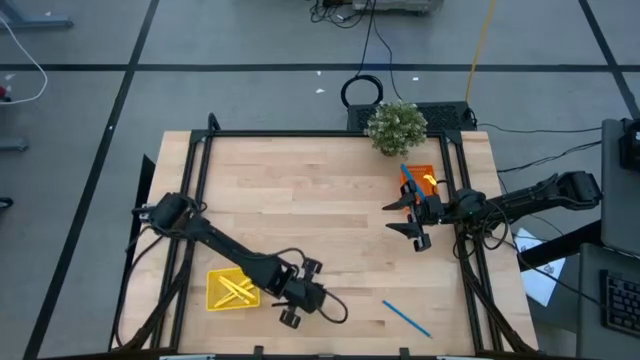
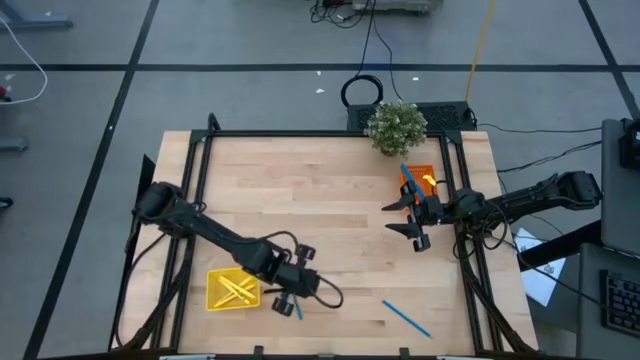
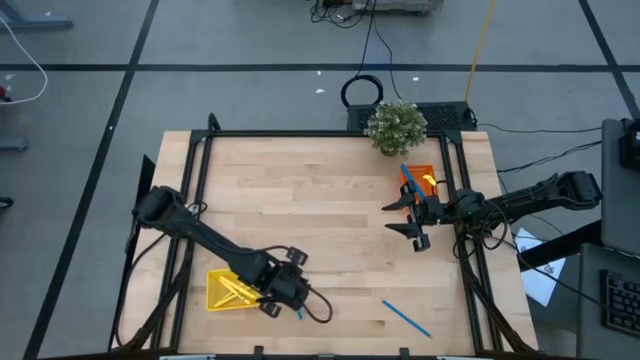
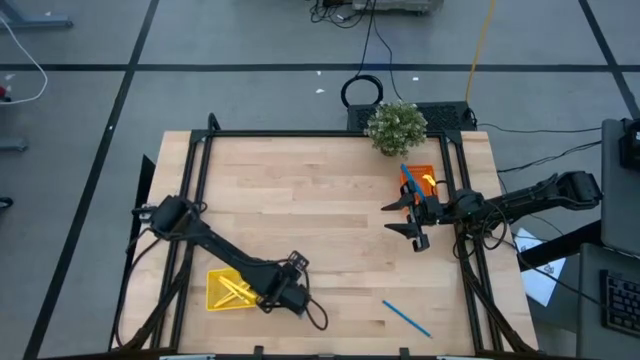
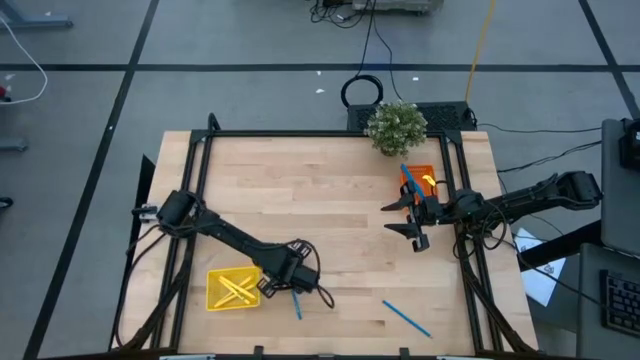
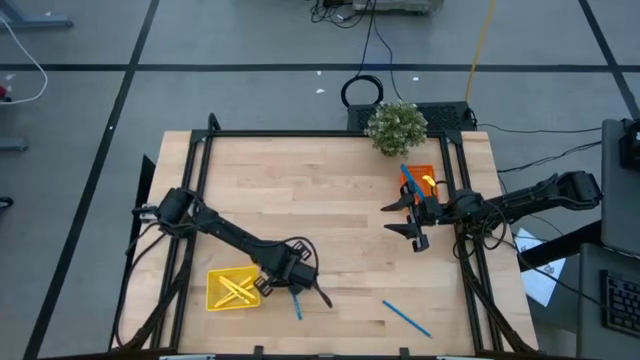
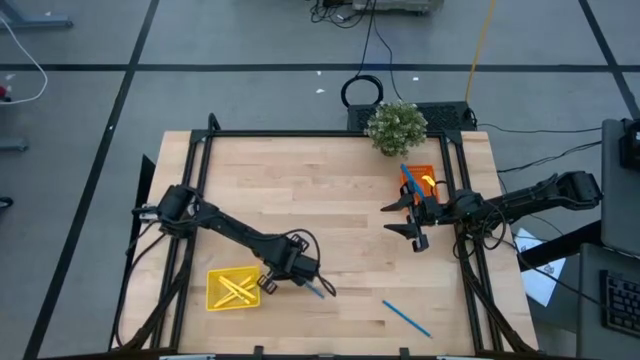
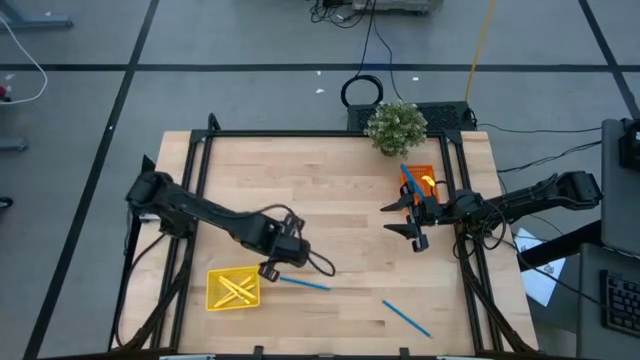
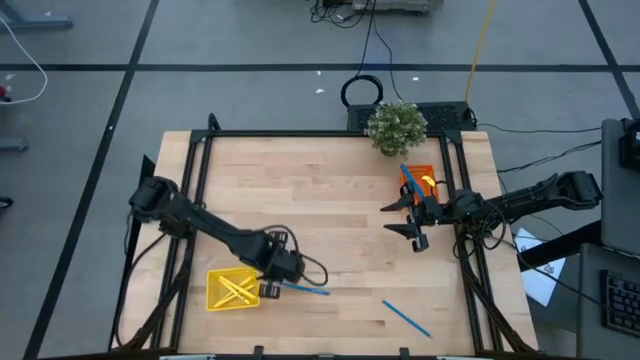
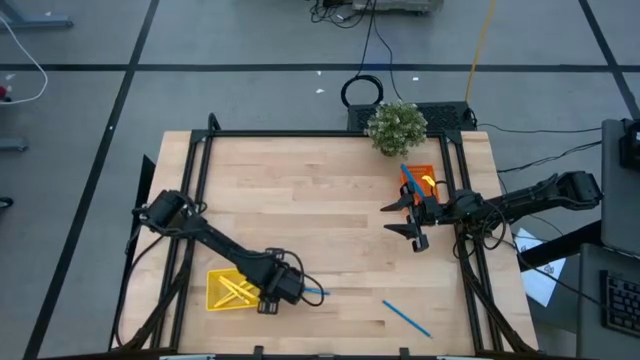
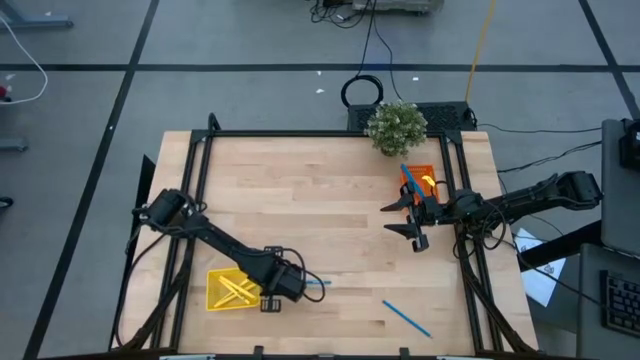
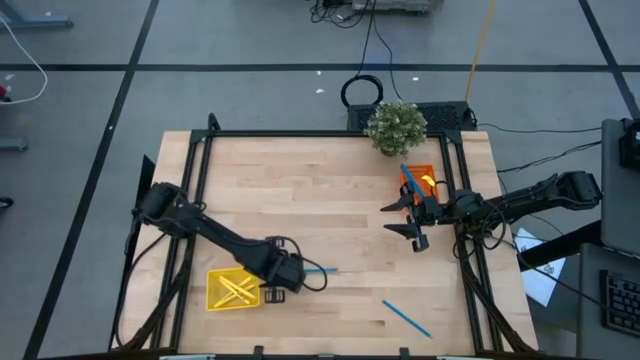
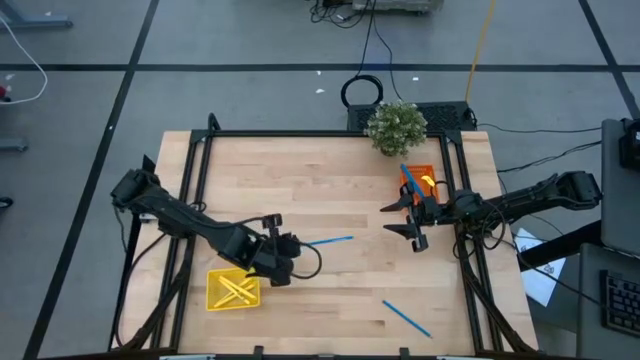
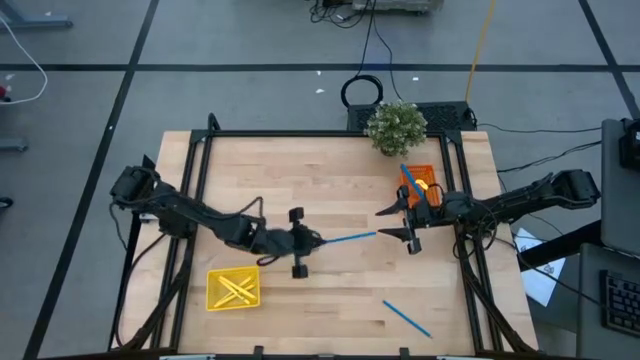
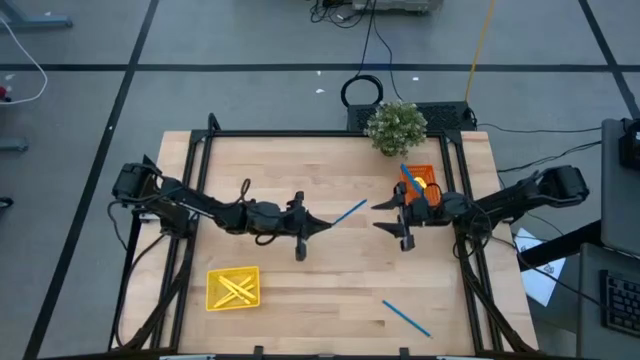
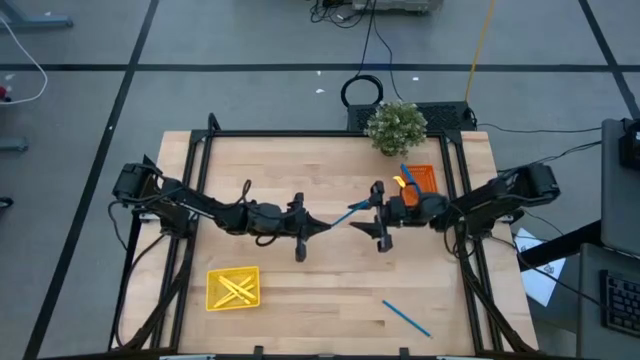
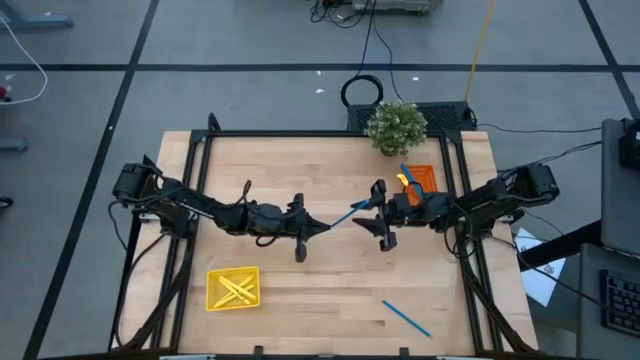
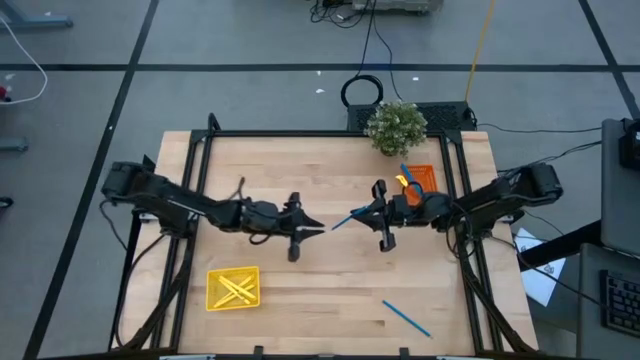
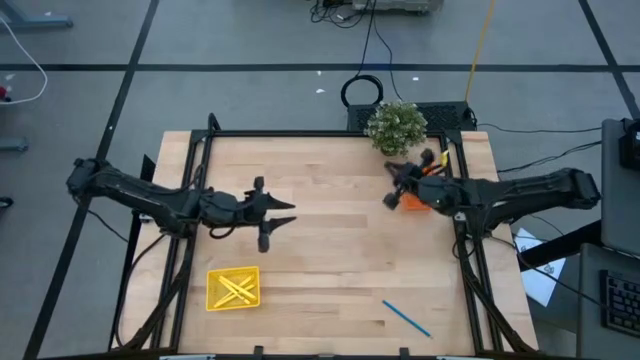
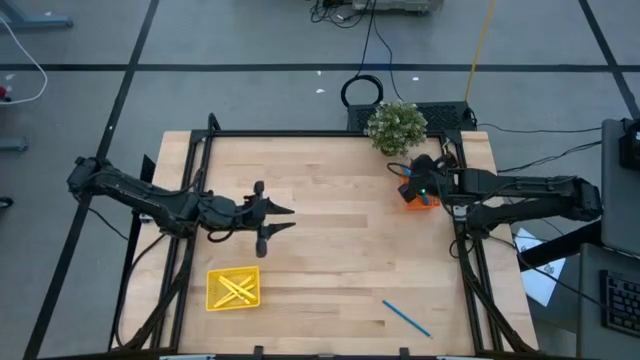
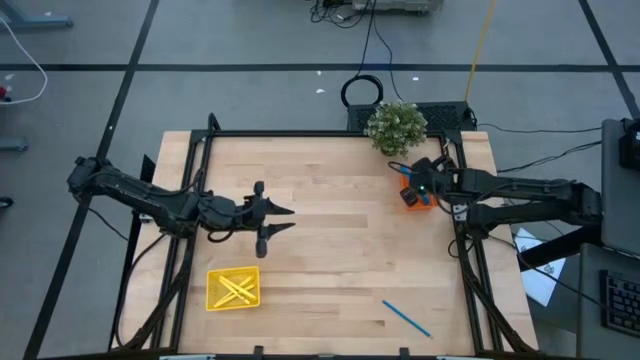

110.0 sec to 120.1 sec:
Task: Sort pens & pencils
Put the left blue pencil into the orange bin

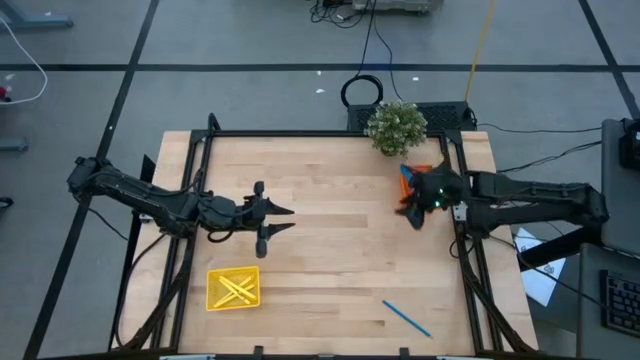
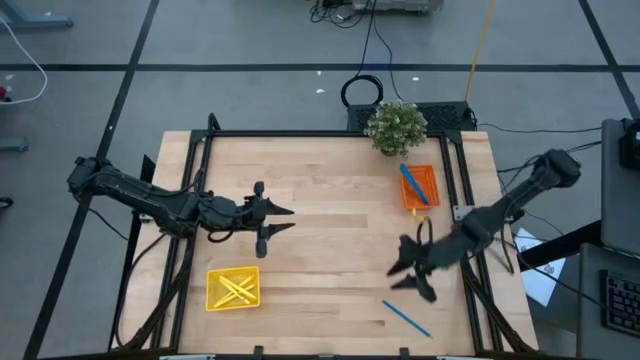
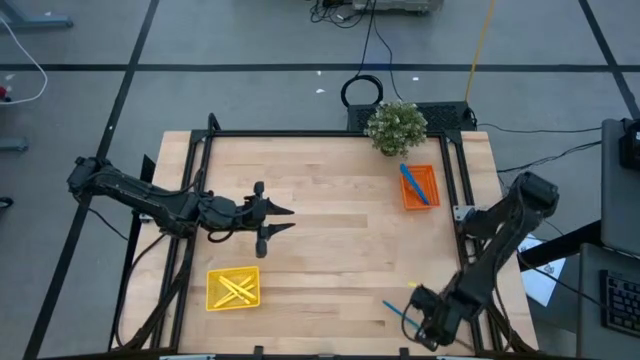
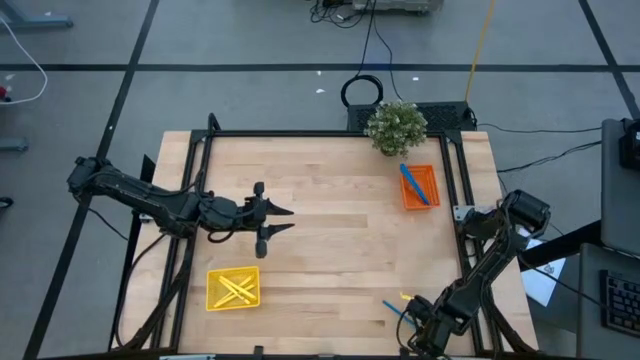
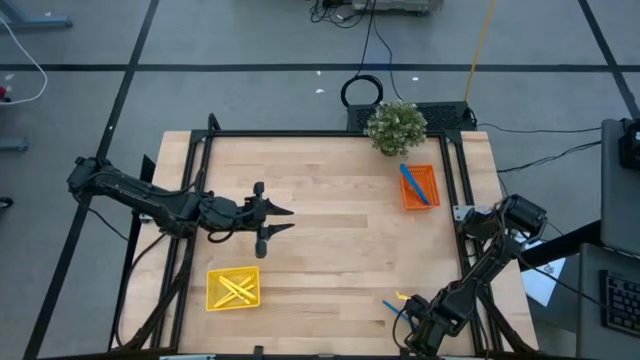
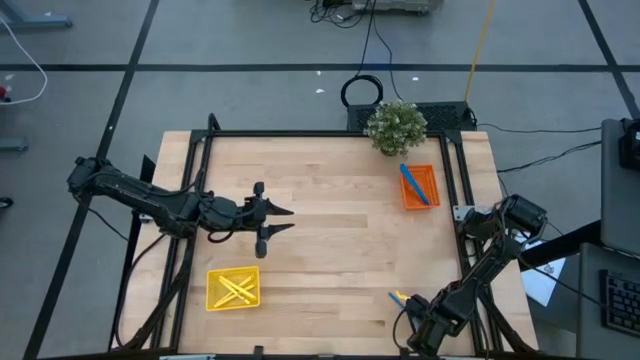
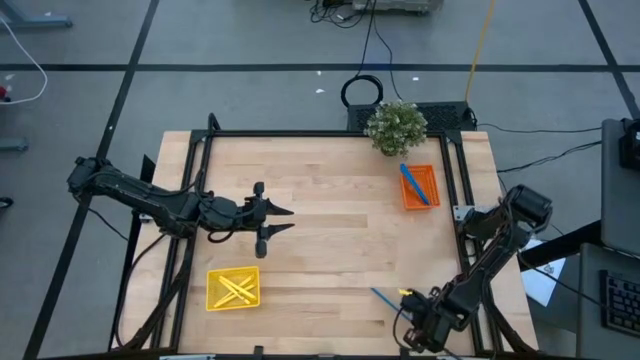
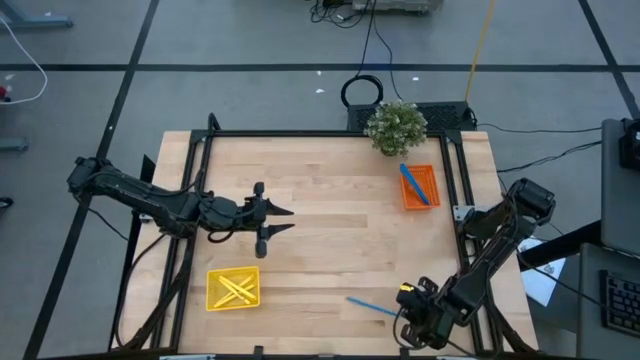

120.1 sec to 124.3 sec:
Put the blue pencil into the orange bin

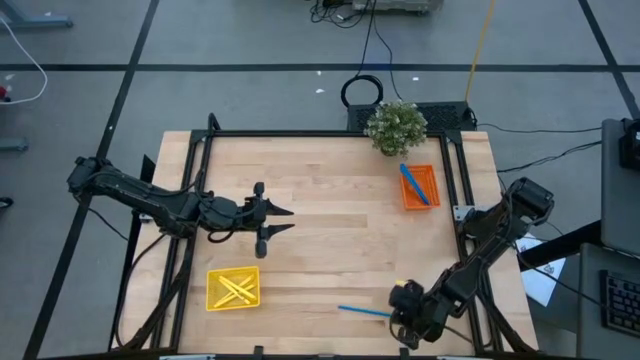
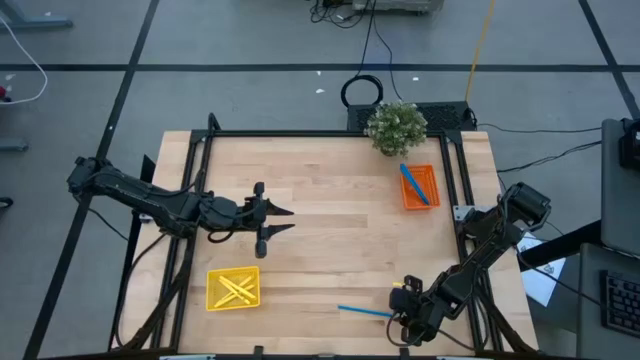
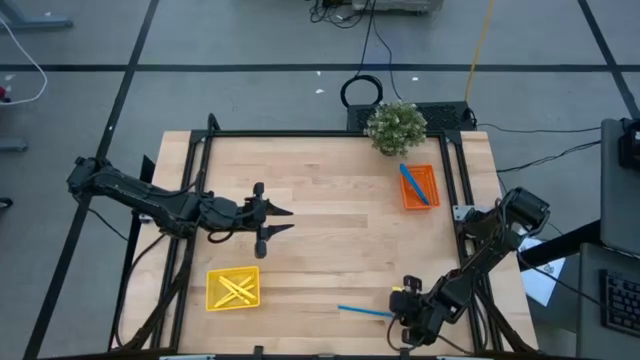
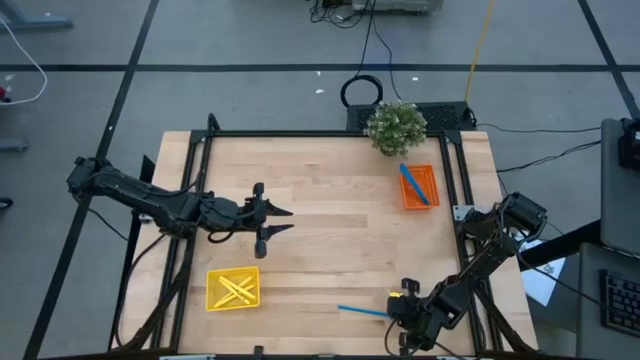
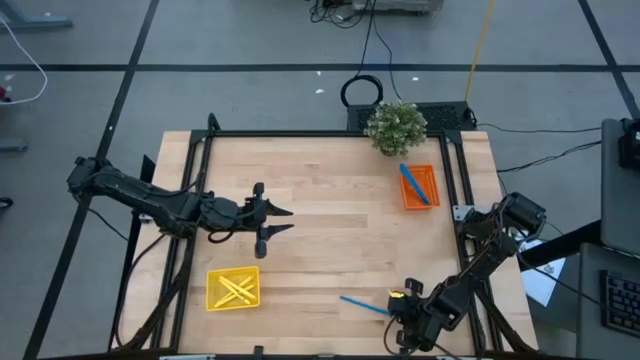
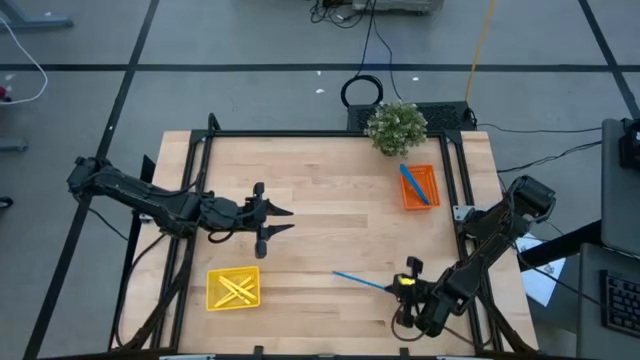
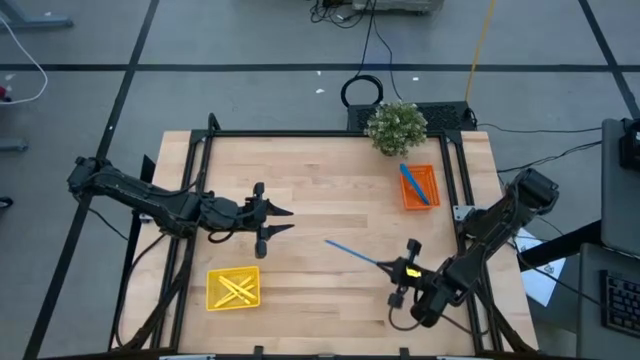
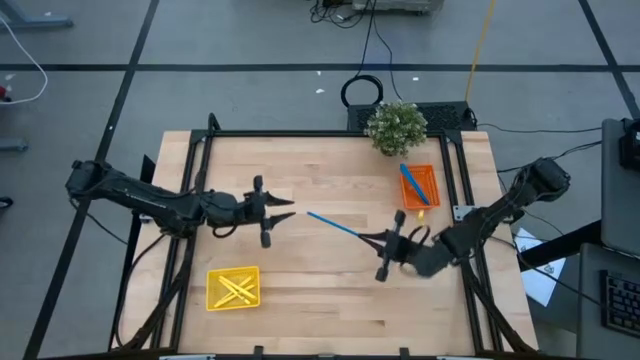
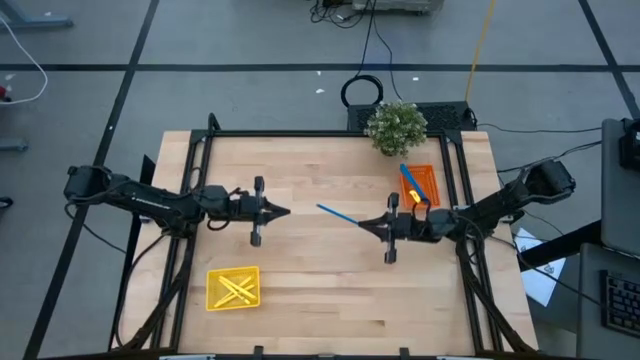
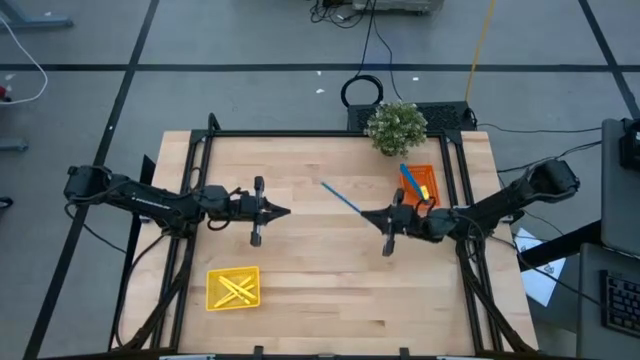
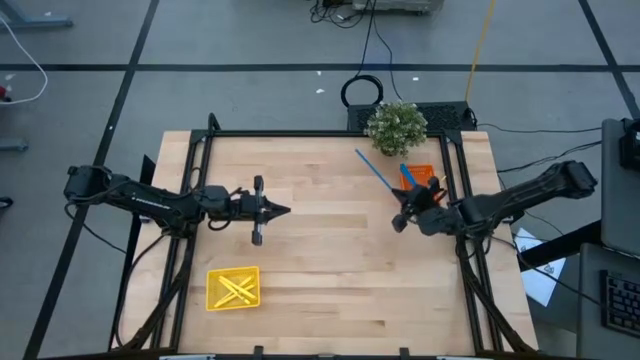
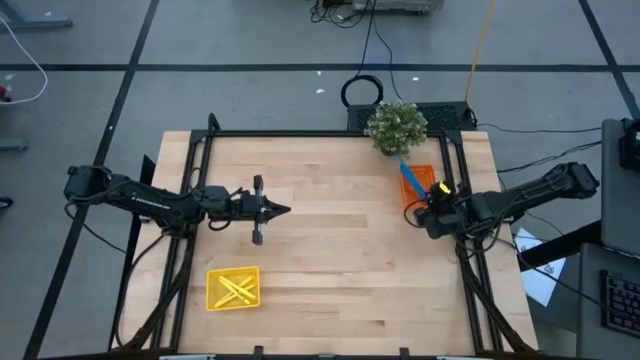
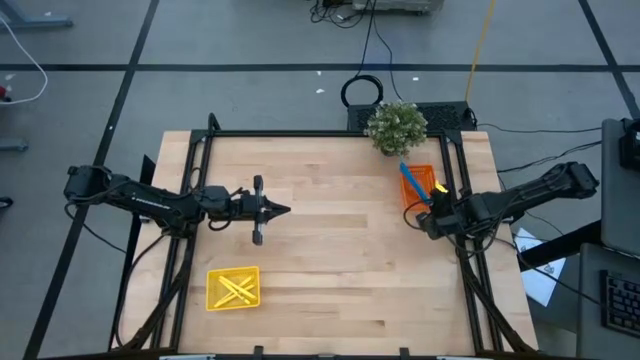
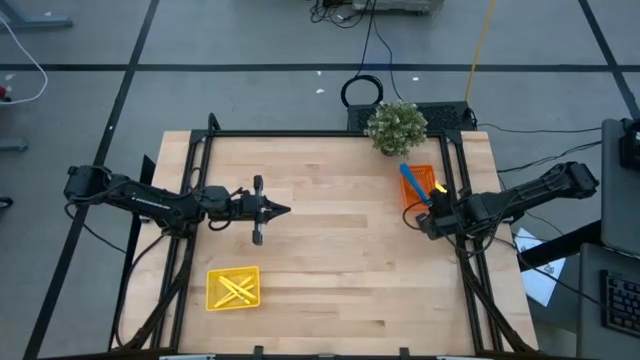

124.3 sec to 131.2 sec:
Put the blue pencil into the orange bin

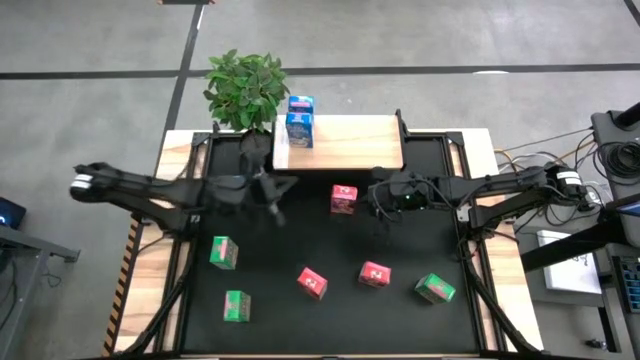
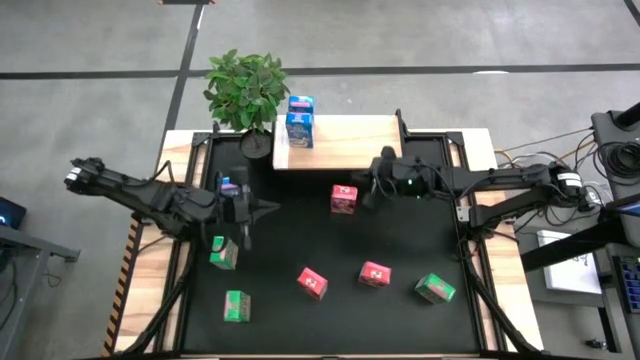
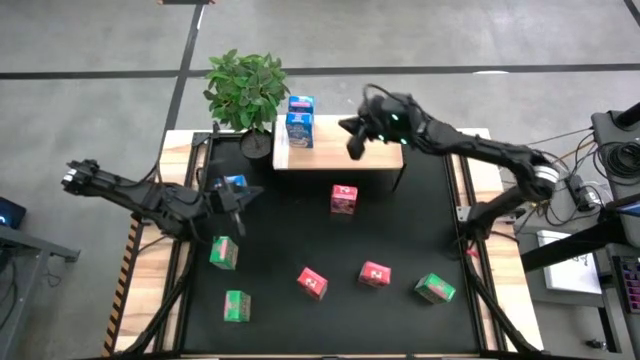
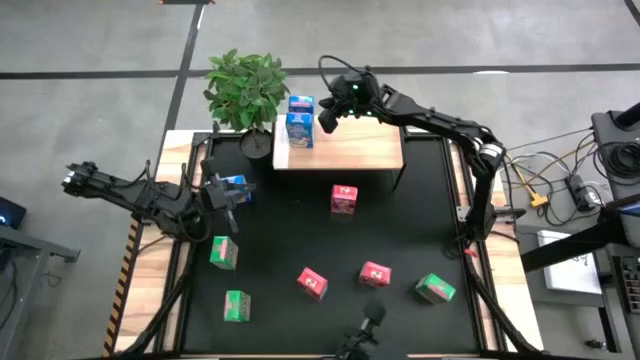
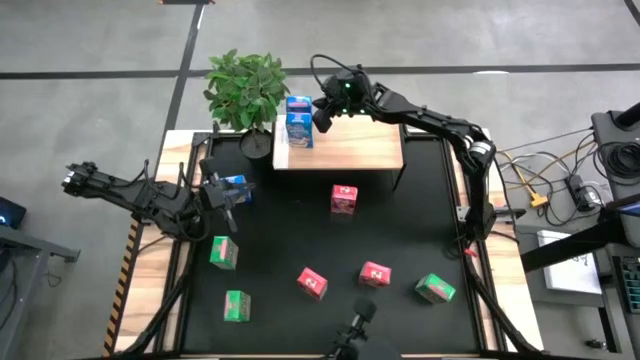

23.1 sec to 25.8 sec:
Task: Stack cereal on shelf
Adjust the blue cereal box on the shelf
